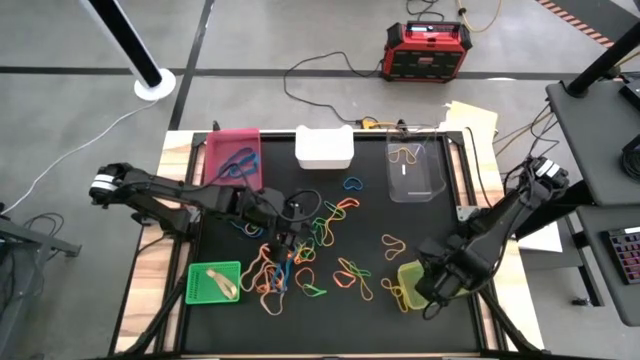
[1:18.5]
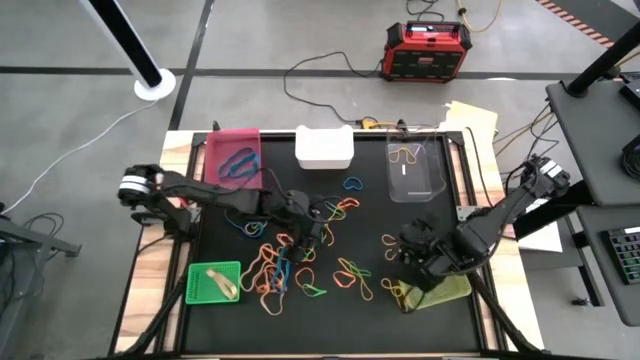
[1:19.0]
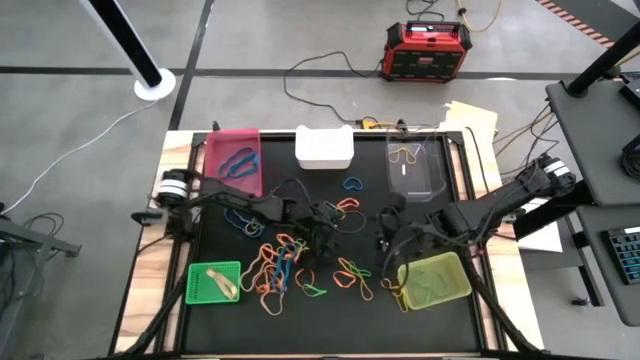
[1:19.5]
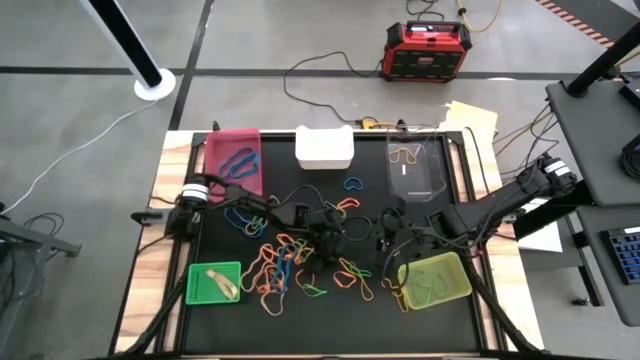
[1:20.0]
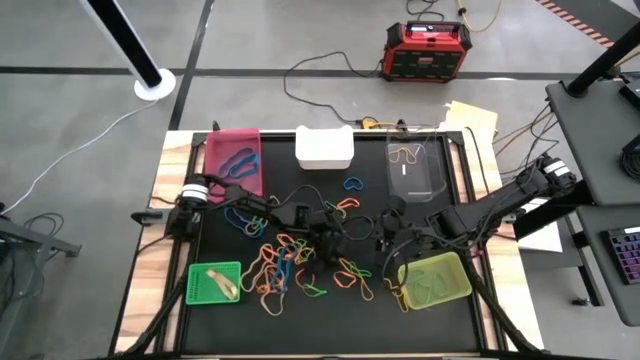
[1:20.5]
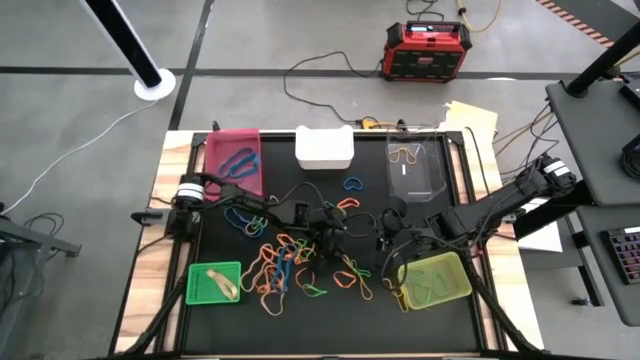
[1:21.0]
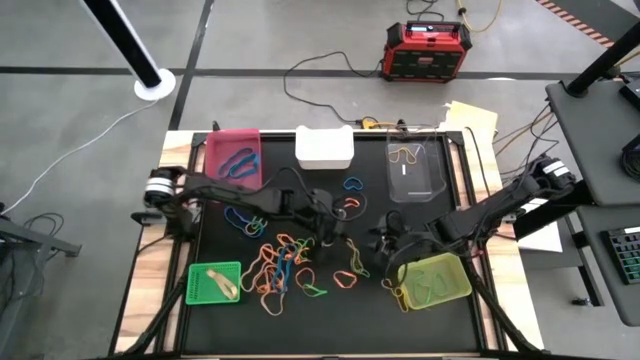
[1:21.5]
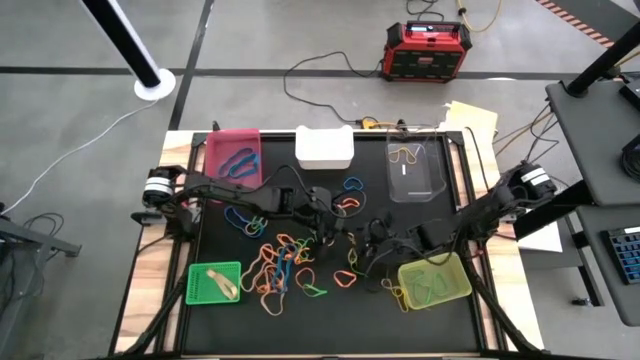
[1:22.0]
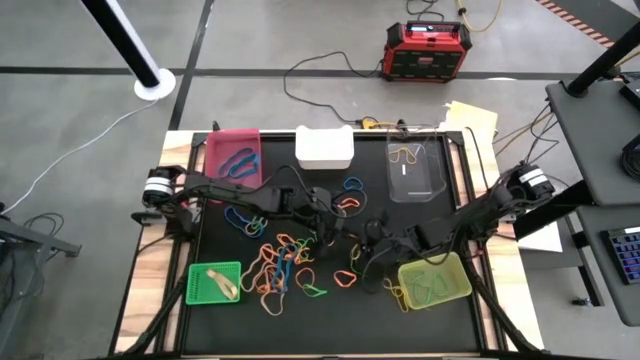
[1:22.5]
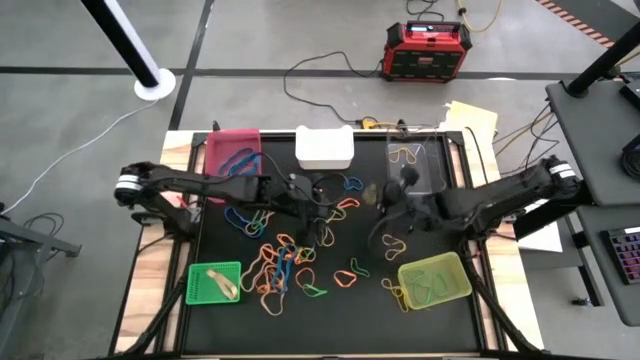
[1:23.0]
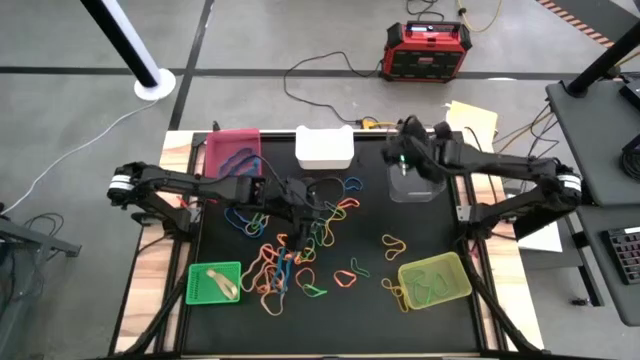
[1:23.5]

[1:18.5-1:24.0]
Task: Sort rubber bands into baskets
Put the yellow rubber band into the transparent bin

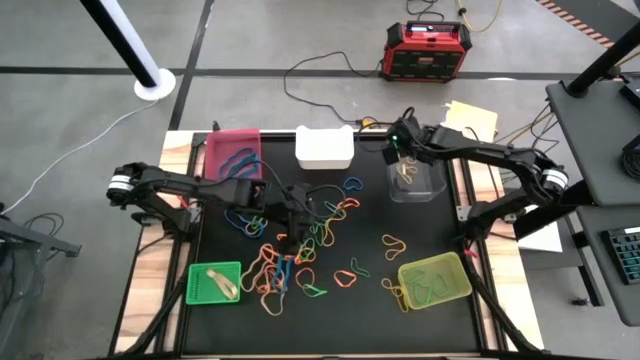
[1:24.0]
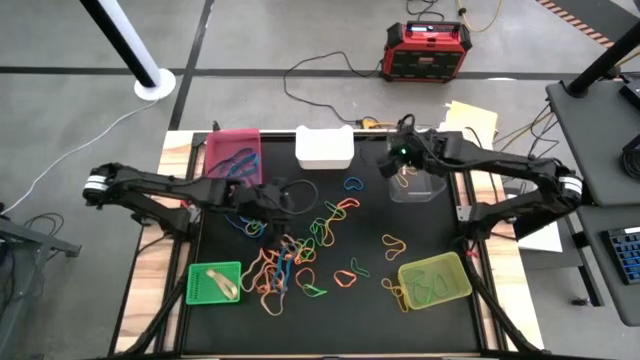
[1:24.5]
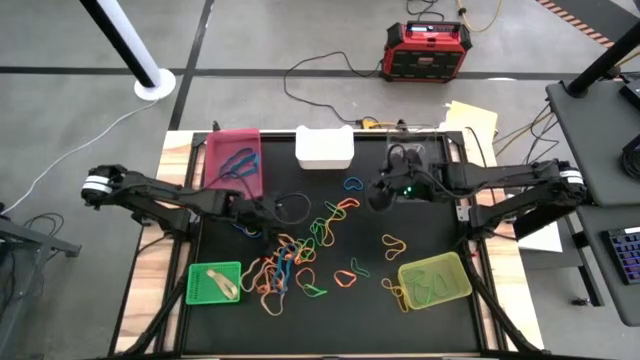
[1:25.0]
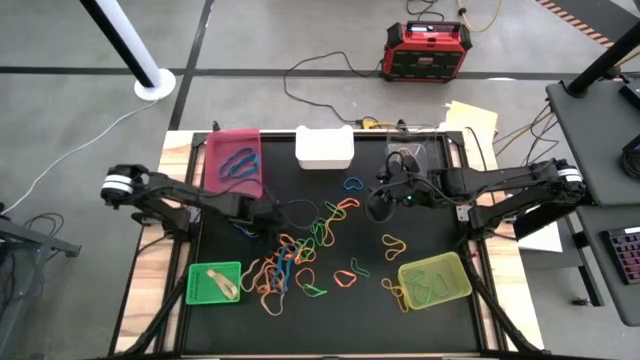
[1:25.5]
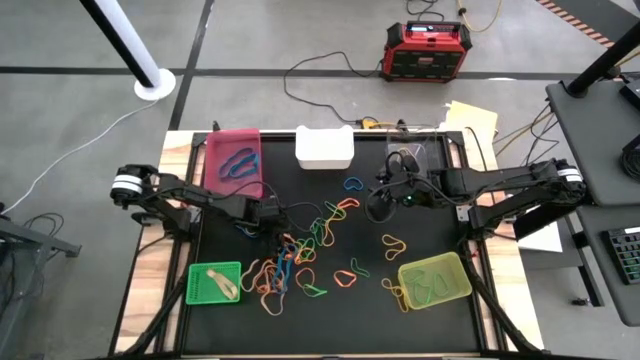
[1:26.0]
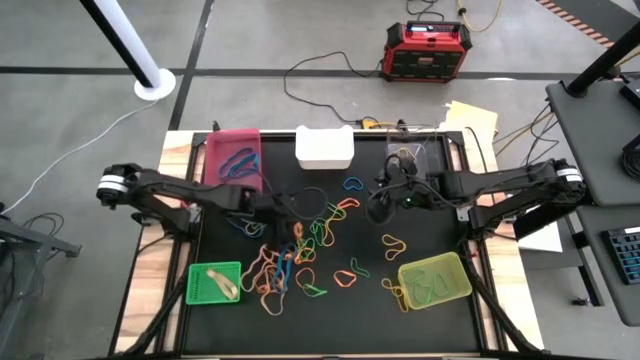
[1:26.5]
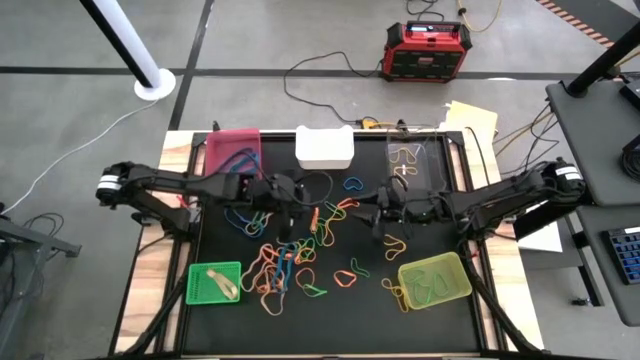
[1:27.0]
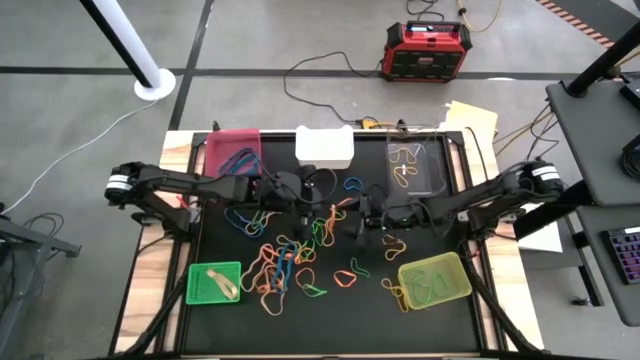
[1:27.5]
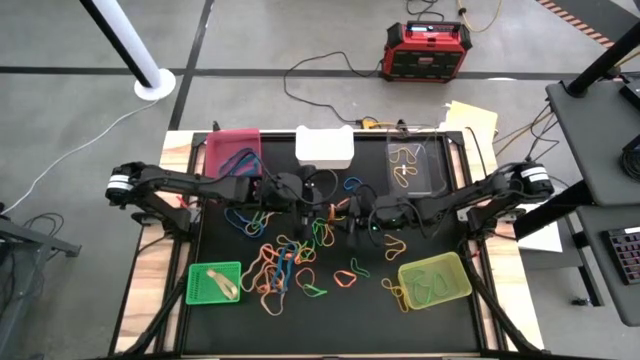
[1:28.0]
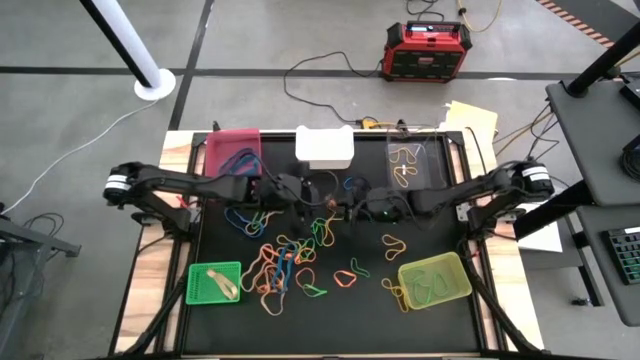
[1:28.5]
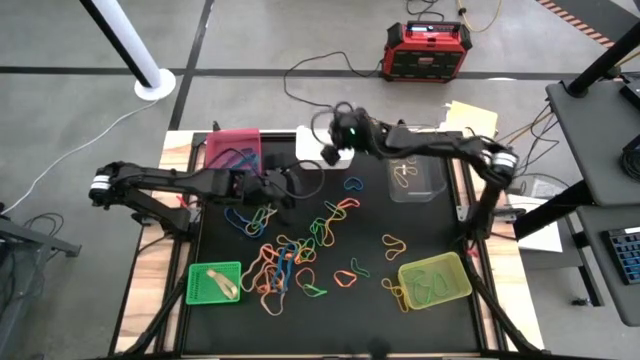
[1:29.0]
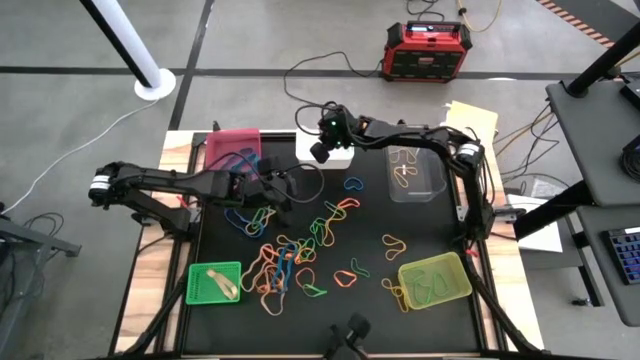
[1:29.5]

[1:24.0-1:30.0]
Put the orange rubber band into the white bin

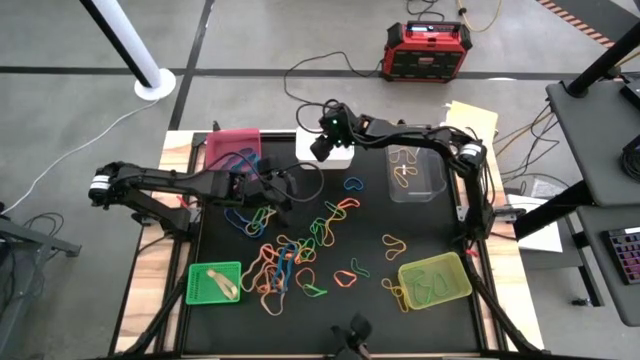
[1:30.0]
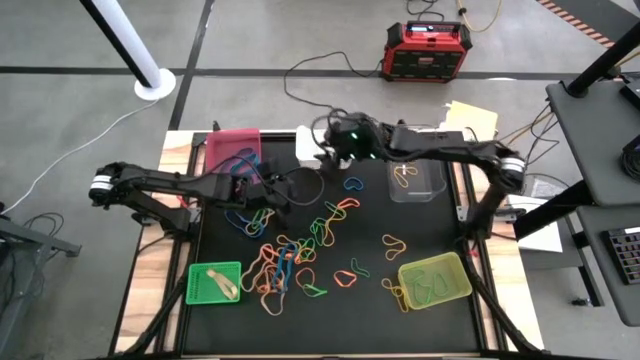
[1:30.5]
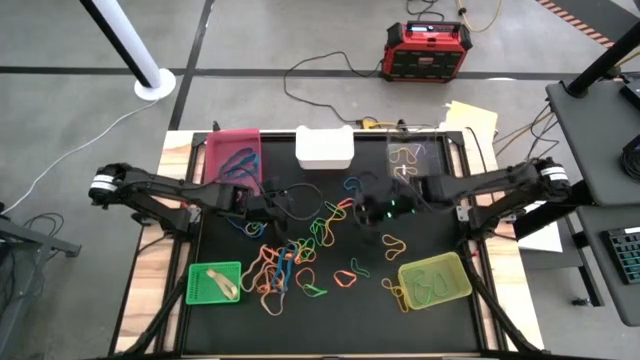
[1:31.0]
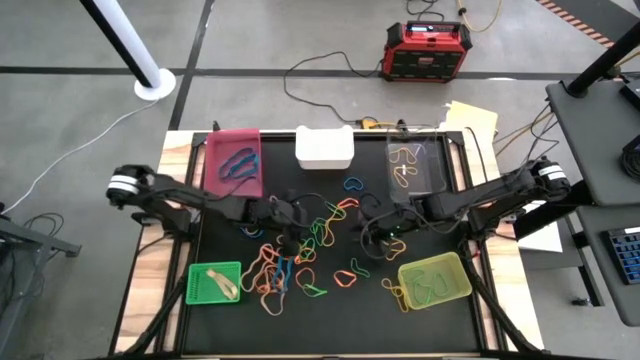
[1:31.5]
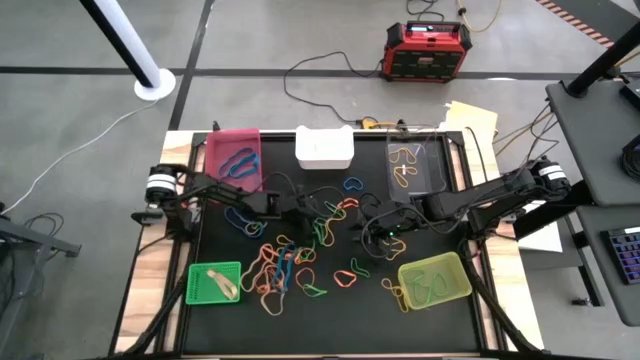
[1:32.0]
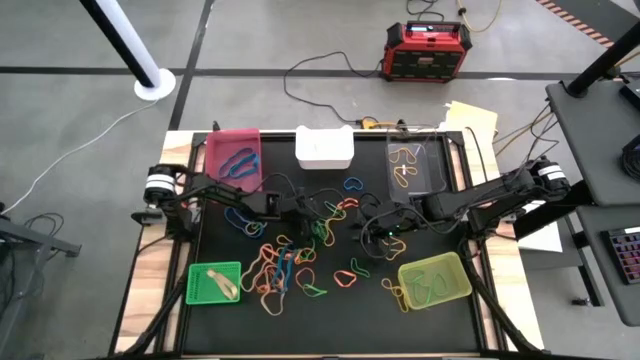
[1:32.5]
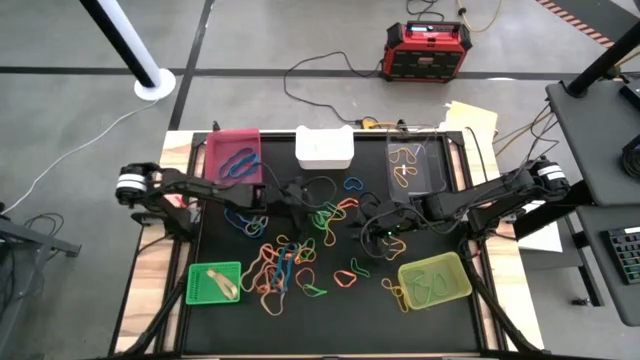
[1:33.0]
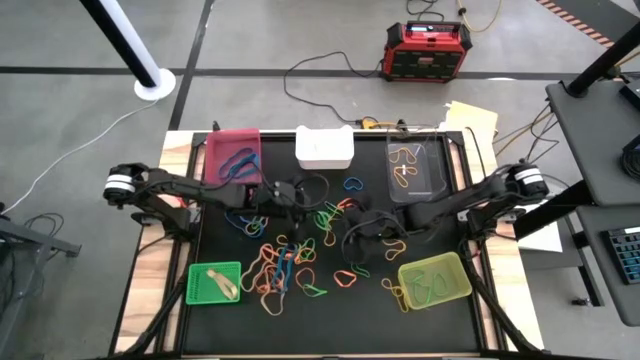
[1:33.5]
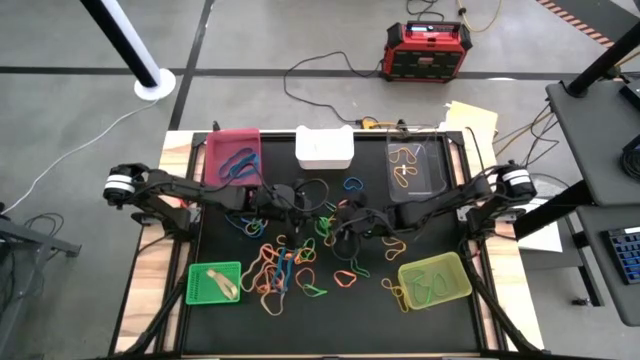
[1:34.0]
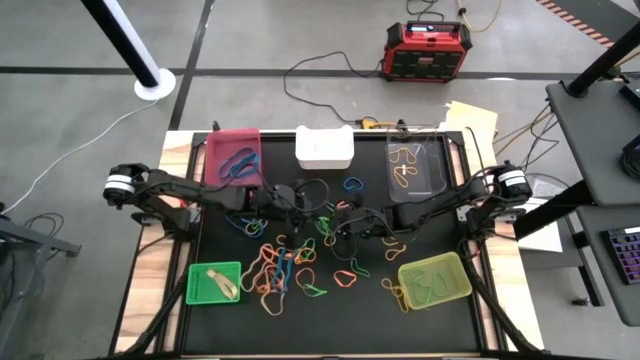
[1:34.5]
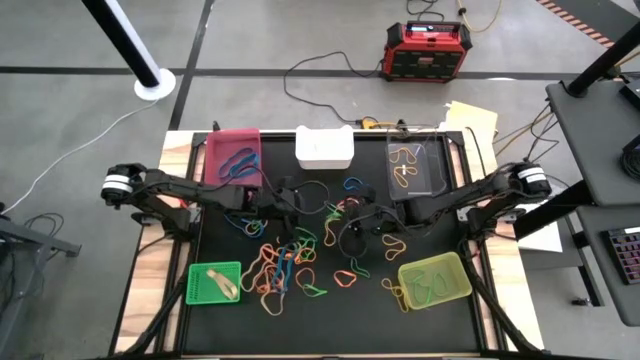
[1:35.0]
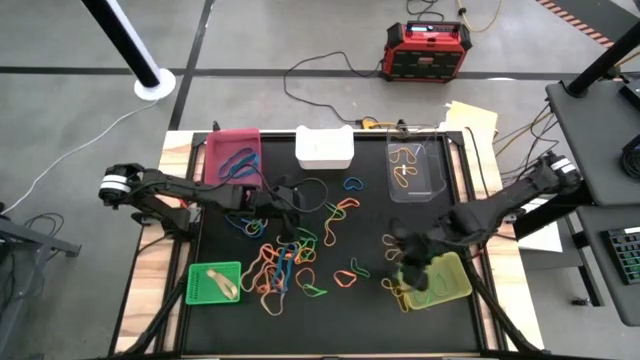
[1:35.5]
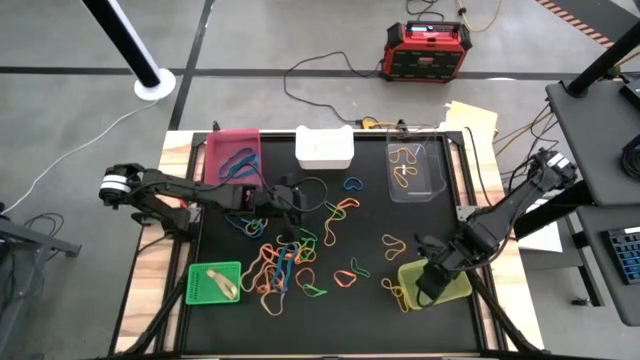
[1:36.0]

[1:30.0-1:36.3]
Put the green rubber band into the yellow bin

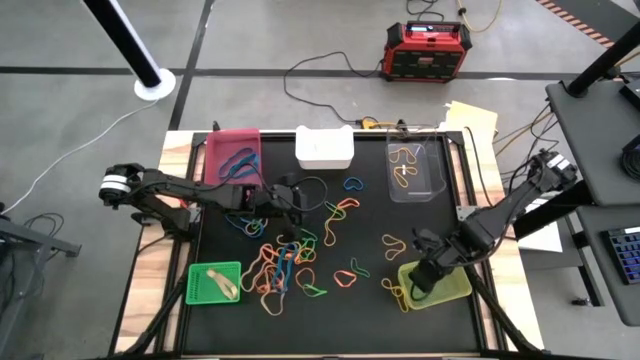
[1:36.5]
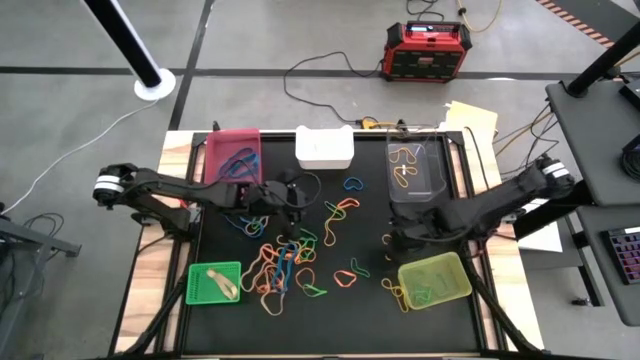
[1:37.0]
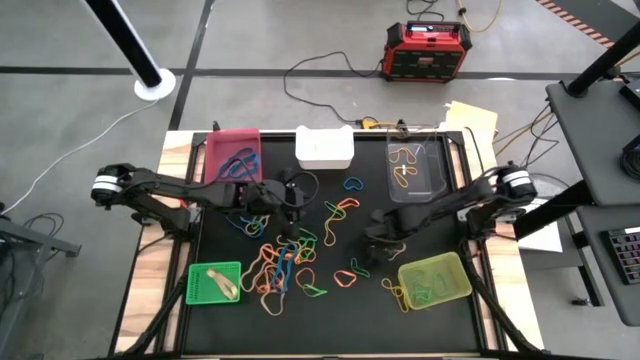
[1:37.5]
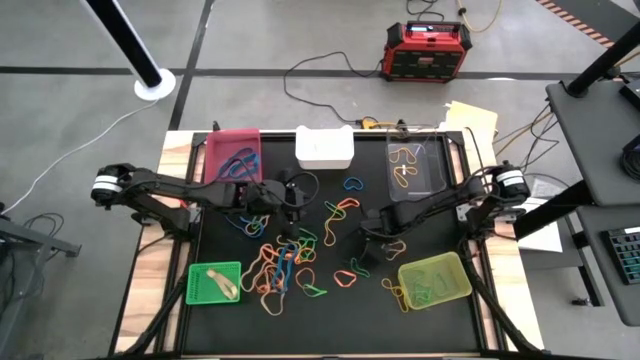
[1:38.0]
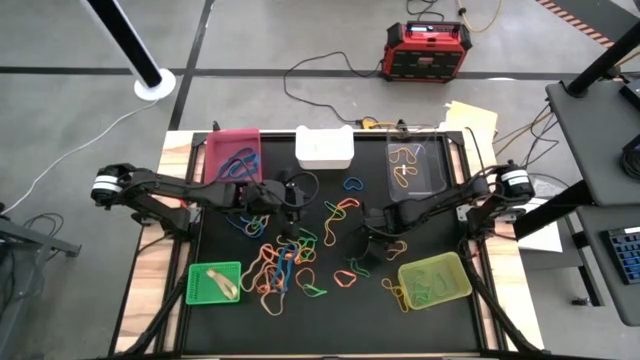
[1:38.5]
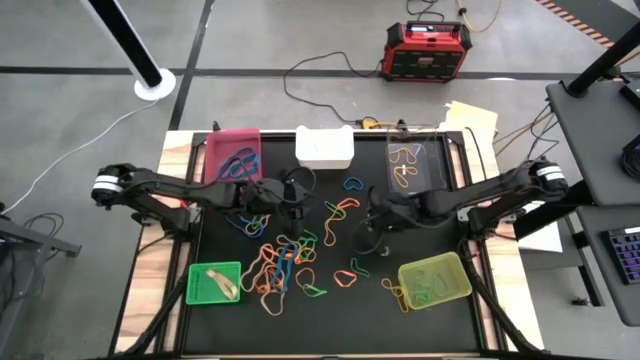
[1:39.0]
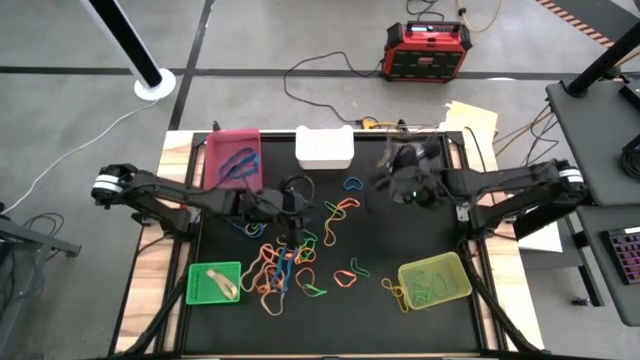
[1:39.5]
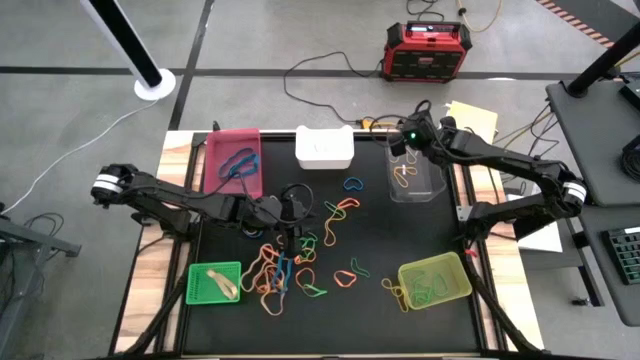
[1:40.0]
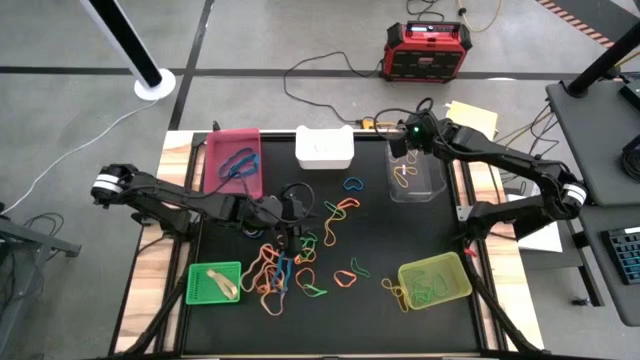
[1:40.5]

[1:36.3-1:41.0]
Put the yellow rubber band into the transparent bin
